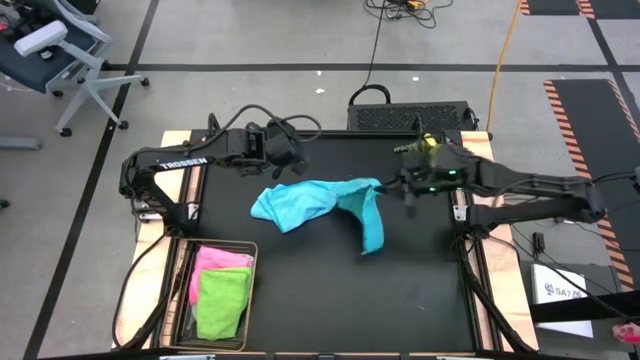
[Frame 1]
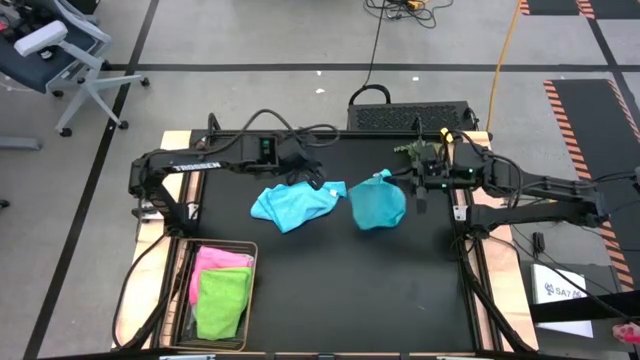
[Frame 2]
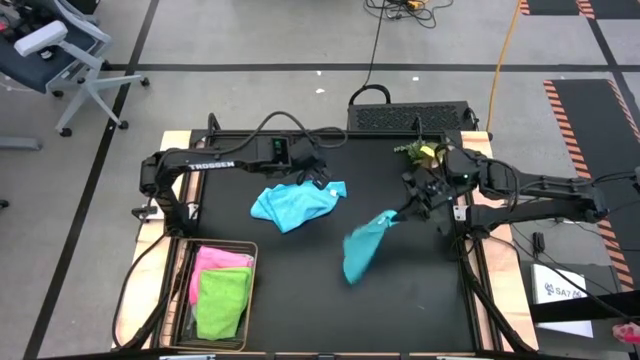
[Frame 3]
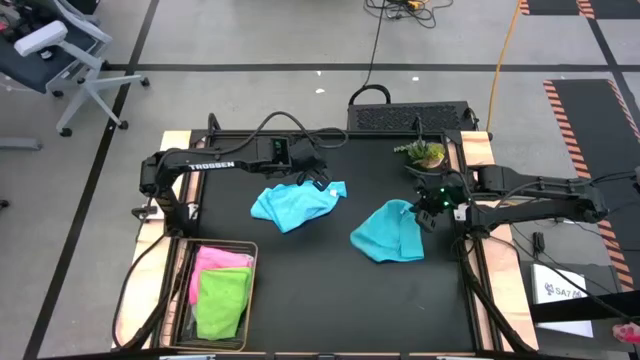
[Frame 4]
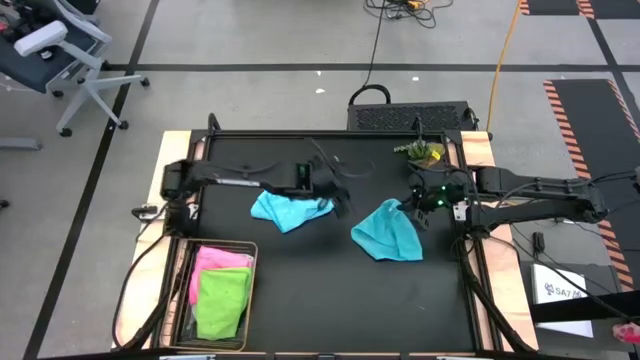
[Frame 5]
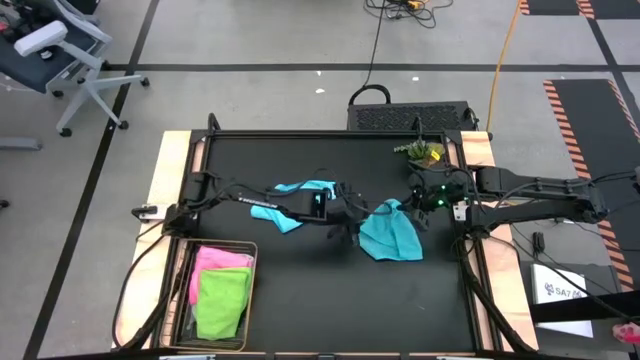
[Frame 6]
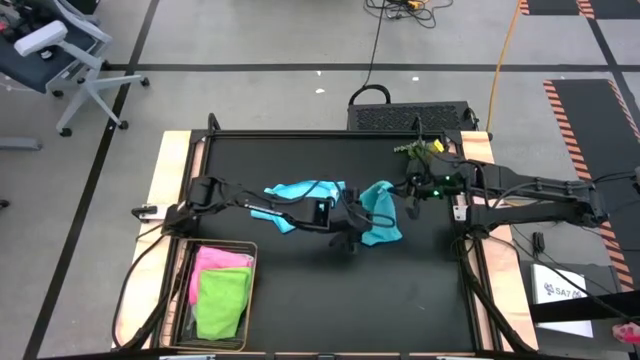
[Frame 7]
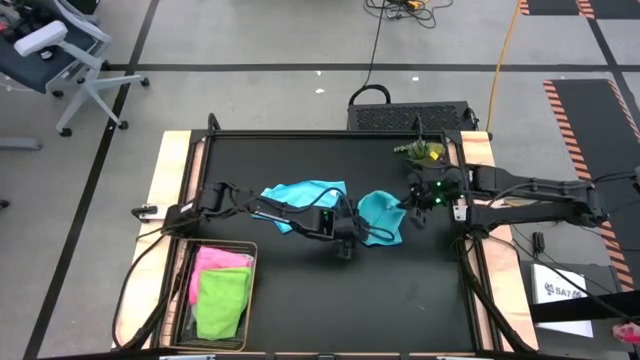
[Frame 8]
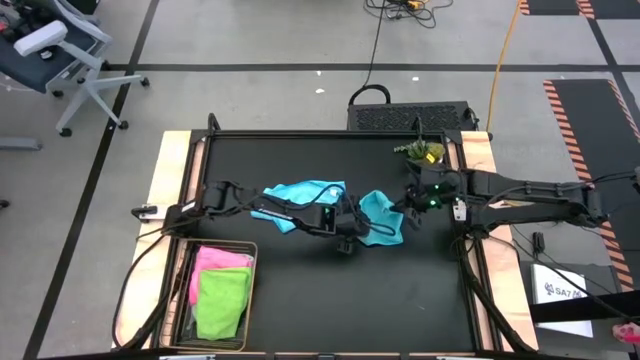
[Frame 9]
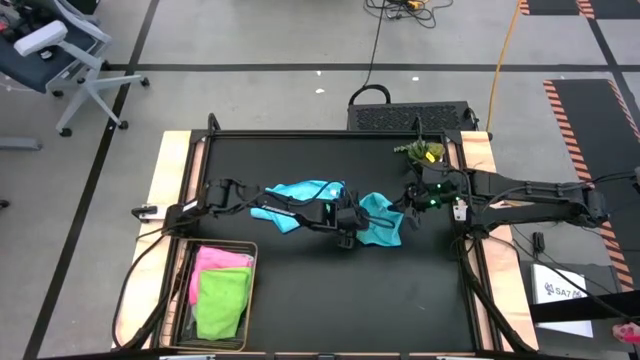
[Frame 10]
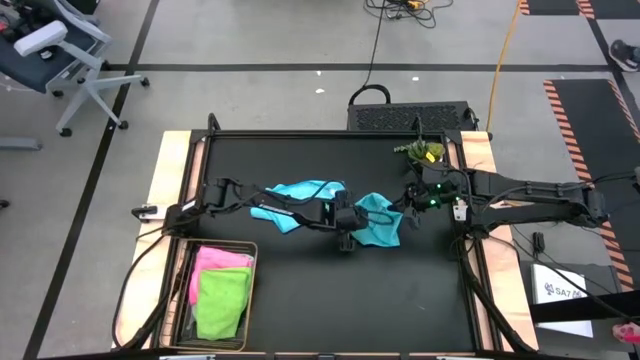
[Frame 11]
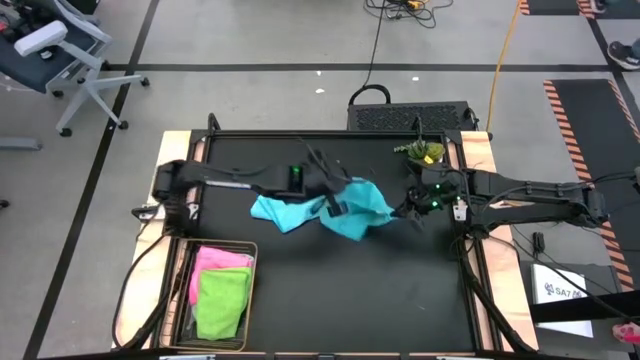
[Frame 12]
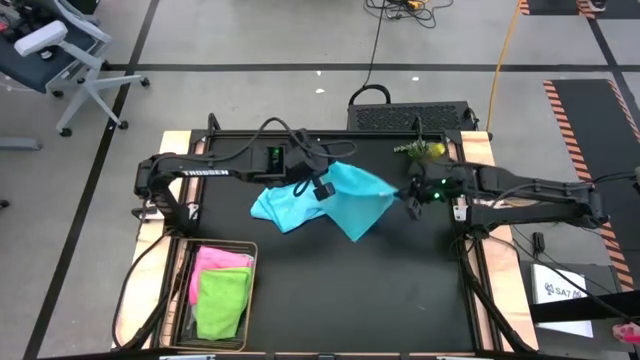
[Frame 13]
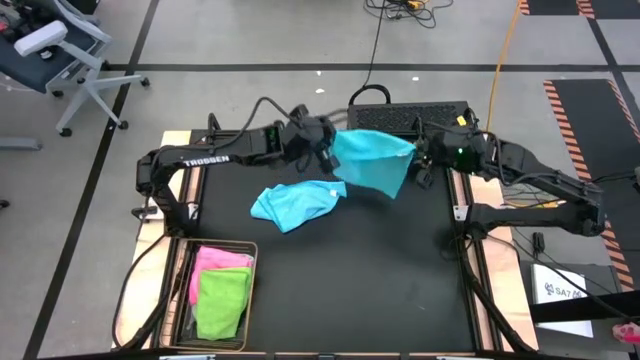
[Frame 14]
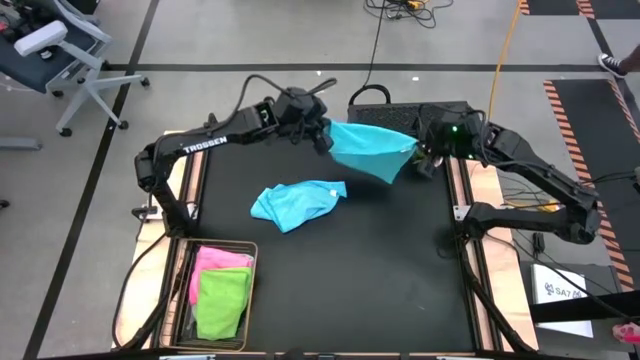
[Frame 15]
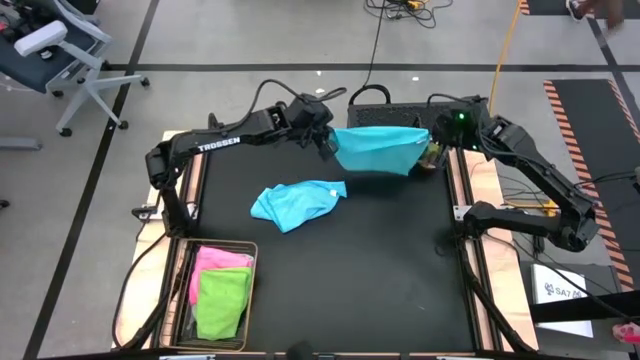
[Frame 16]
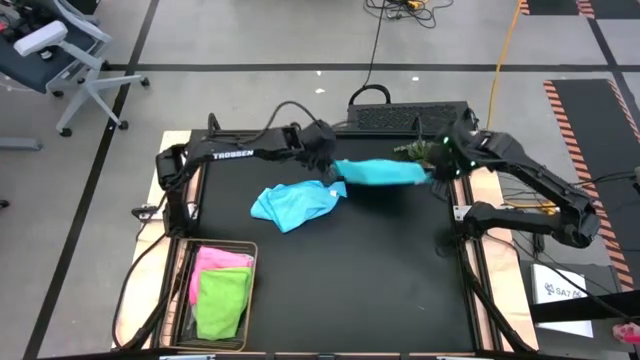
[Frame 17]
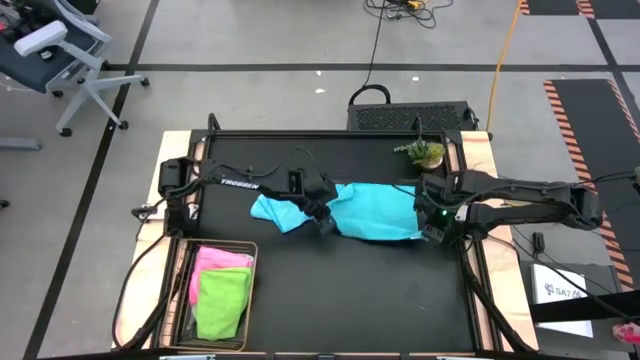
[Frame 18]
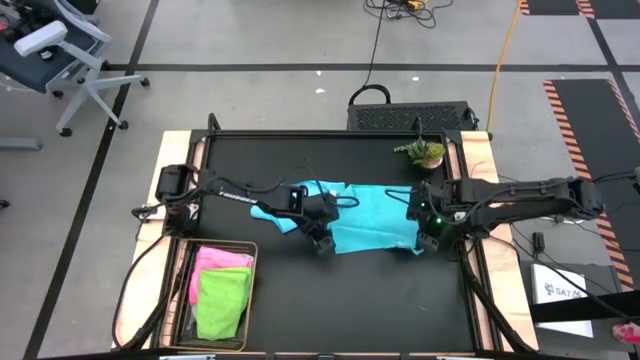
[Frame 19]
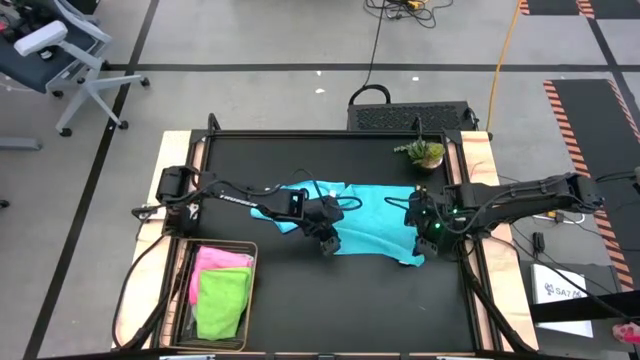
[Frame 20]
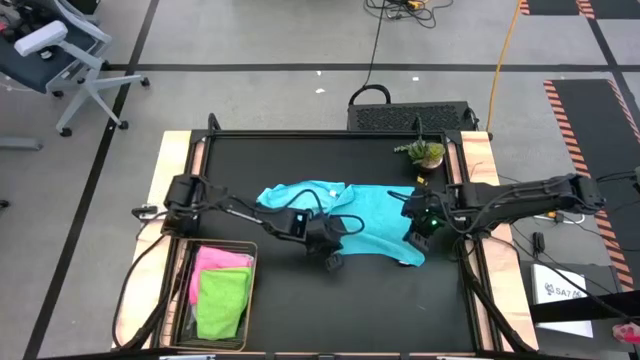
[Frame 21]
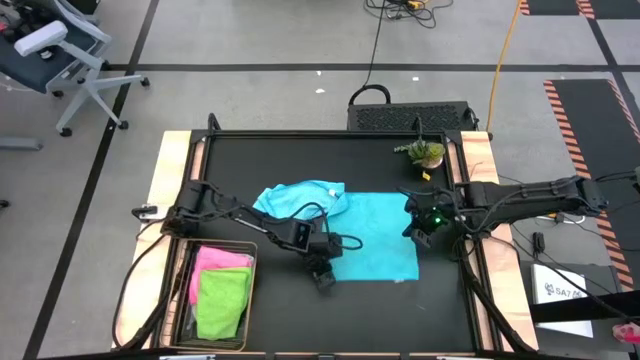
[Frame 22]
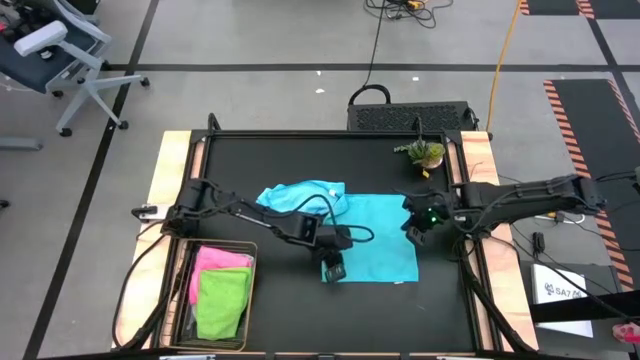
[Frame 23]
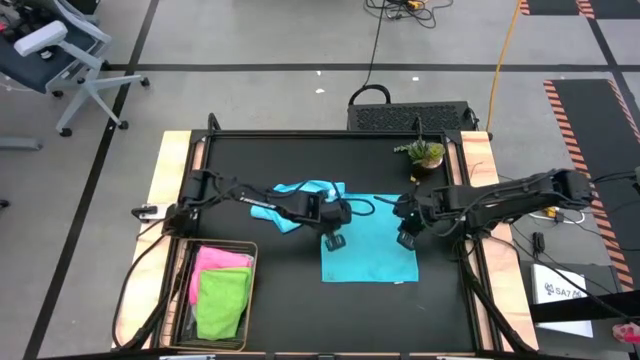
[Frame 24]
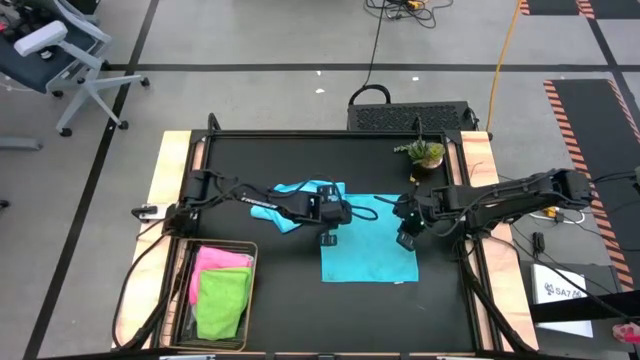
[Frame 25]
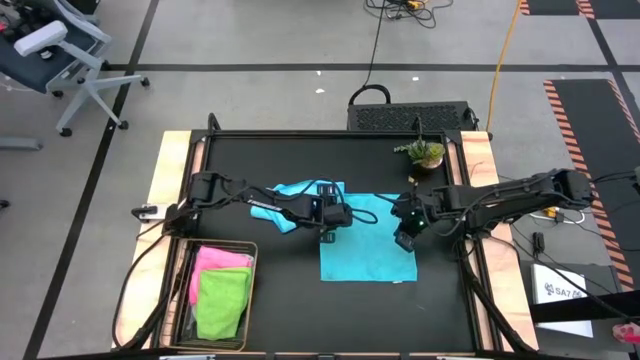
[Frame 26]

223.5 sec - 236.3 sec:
Task: Fold microfiber towels
Fold the right blue microfiber cloth

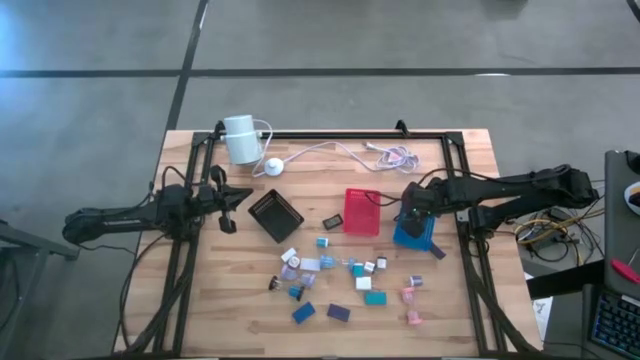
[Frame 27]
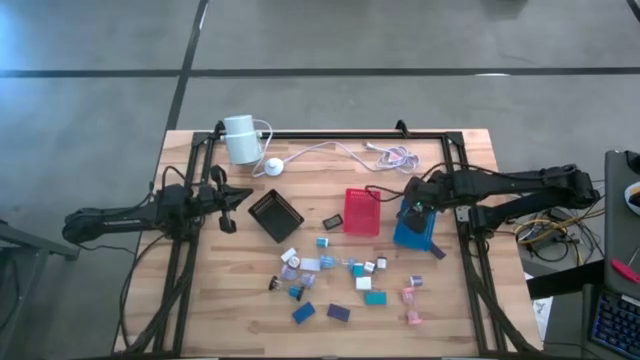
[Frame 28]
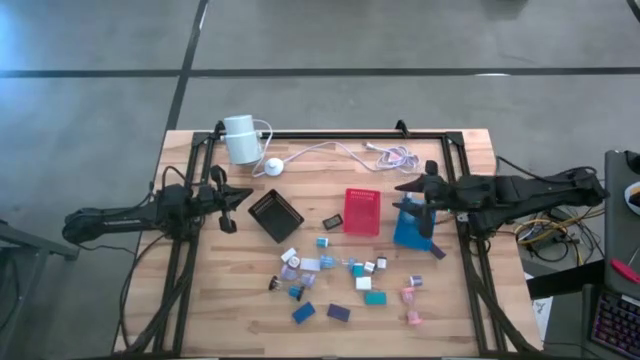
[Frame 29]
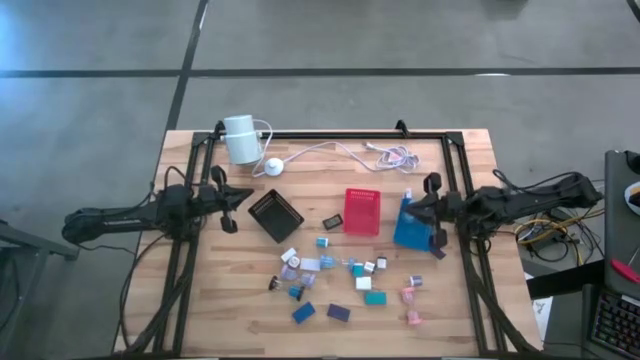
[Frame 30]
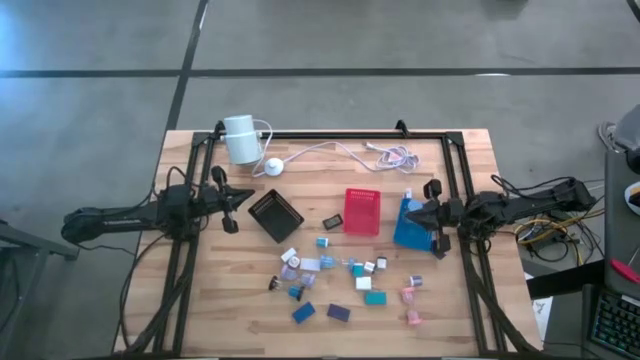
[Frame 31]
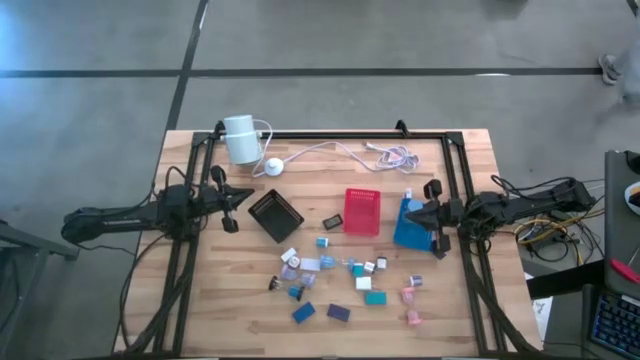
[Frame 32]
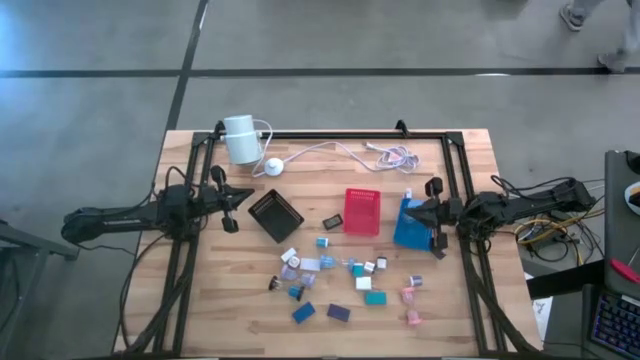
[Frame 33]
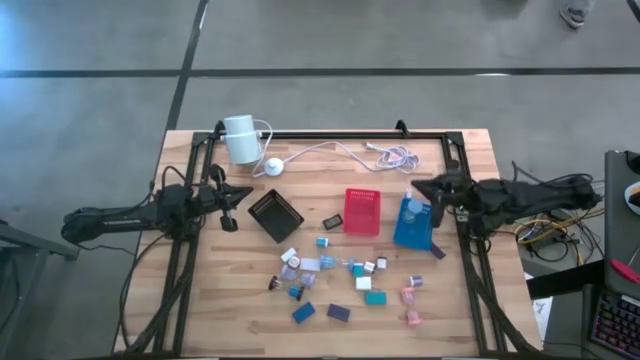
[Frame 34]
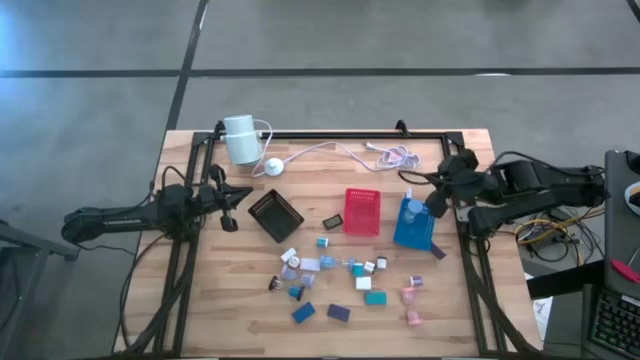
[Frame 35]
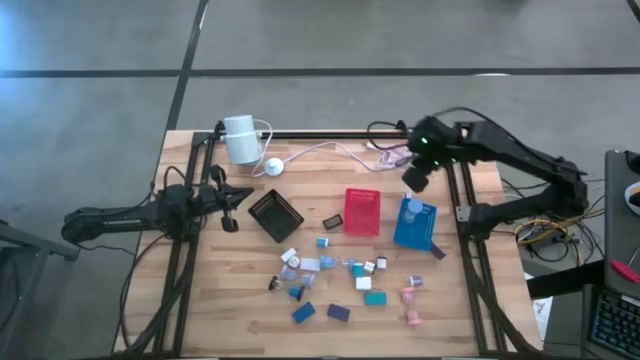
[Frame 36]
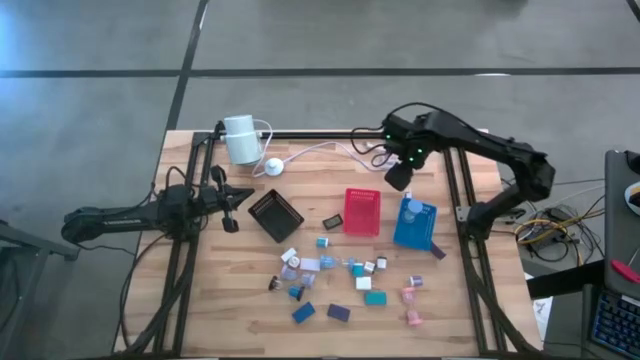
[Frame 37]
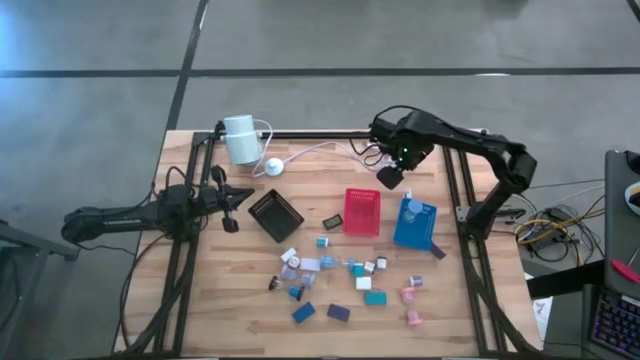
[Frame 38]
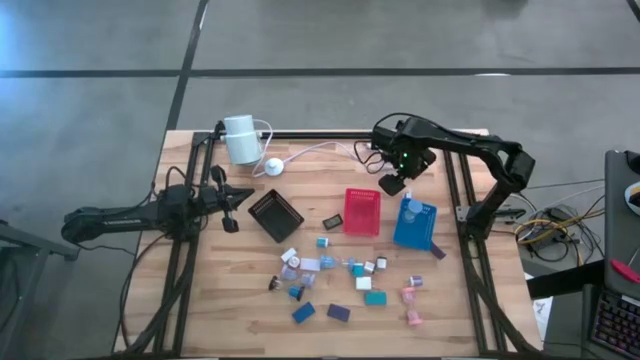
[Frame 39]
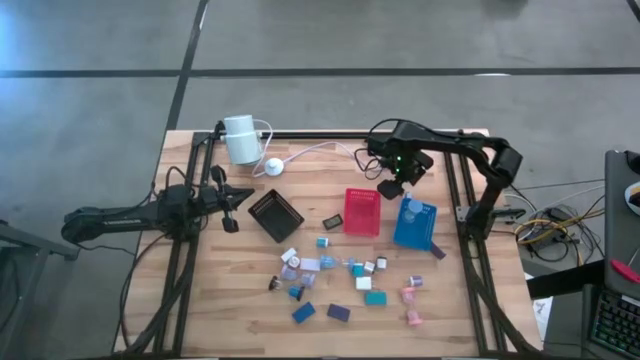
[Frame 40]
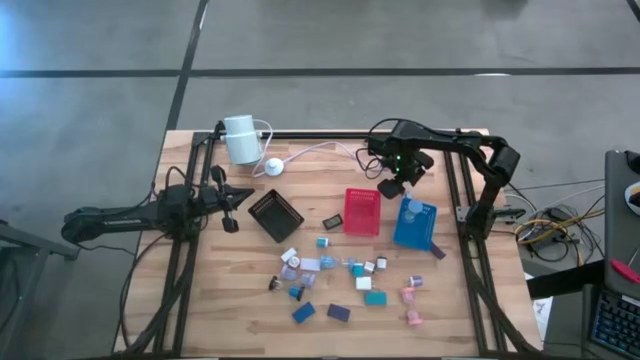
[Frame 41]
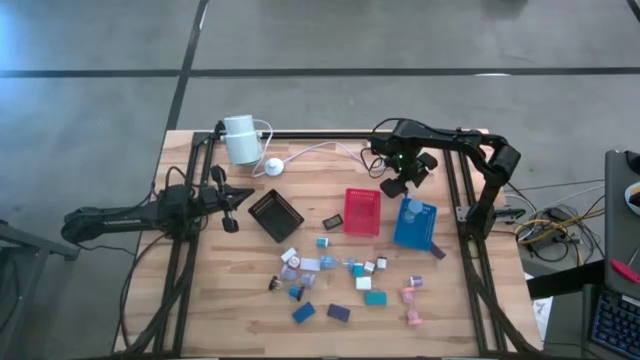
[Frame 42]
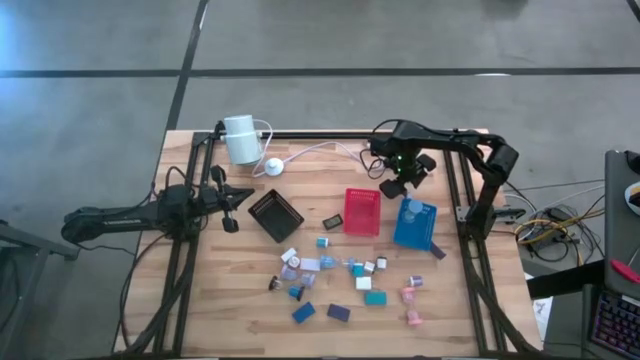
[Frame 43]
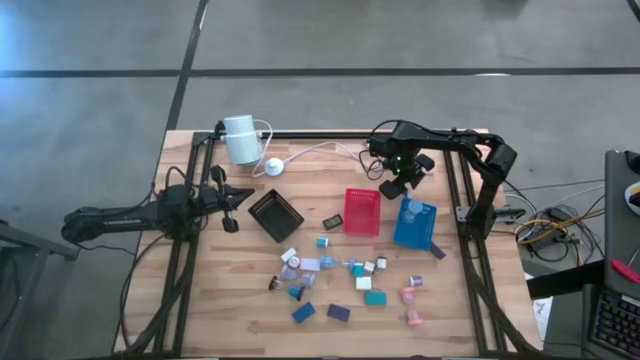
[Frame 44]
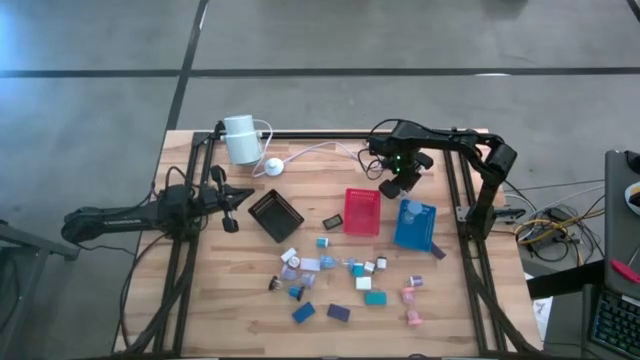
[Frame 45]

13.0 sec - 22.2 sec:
Task: Pick & Place Office items
Put the top white digital clock into the red bin
